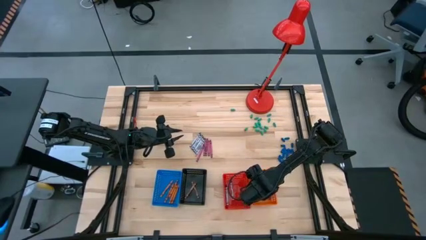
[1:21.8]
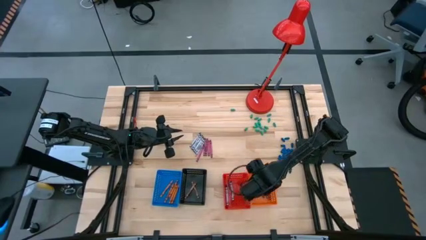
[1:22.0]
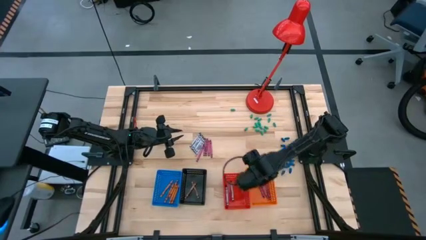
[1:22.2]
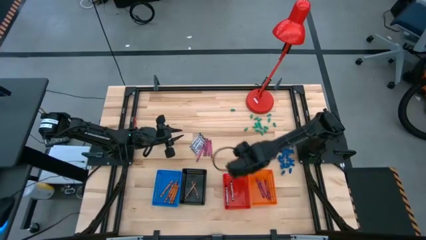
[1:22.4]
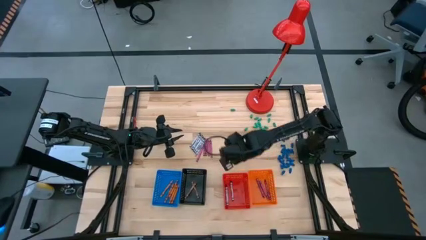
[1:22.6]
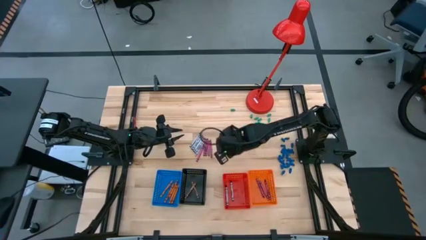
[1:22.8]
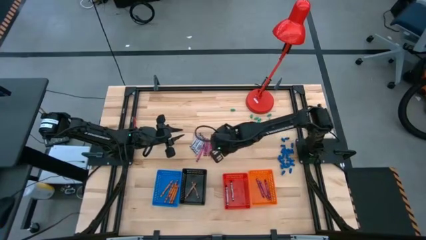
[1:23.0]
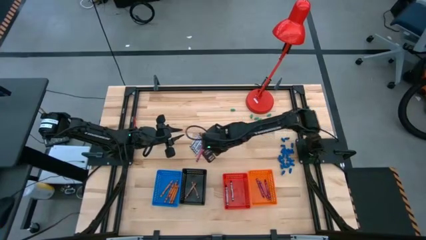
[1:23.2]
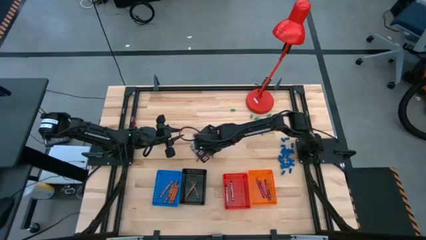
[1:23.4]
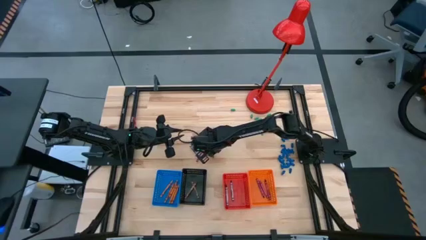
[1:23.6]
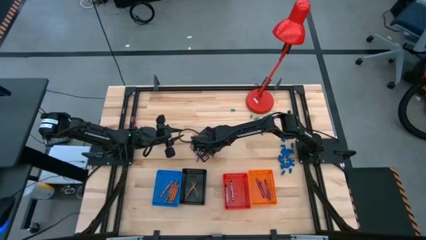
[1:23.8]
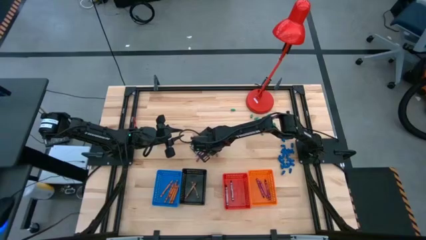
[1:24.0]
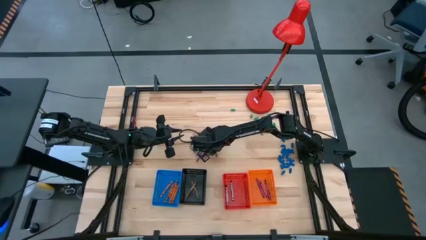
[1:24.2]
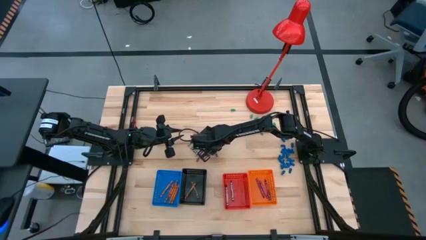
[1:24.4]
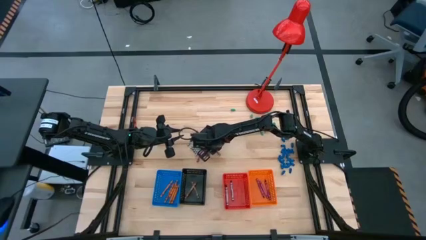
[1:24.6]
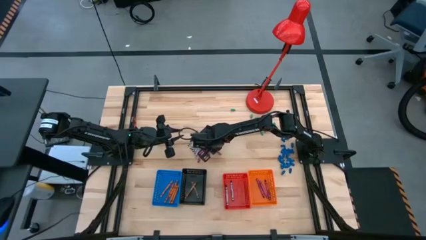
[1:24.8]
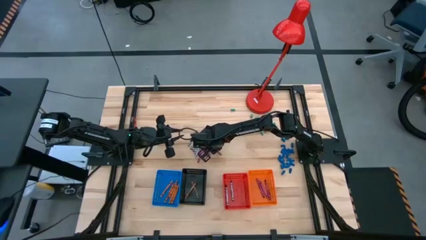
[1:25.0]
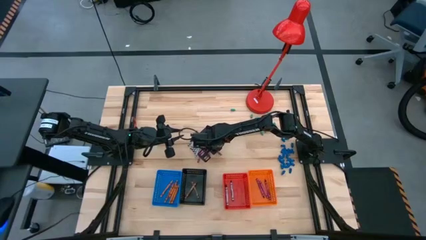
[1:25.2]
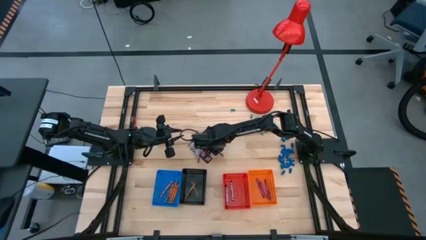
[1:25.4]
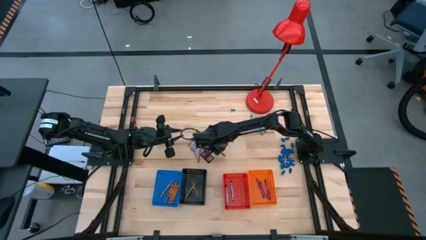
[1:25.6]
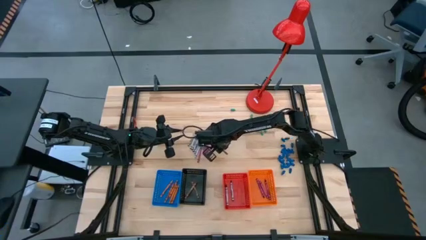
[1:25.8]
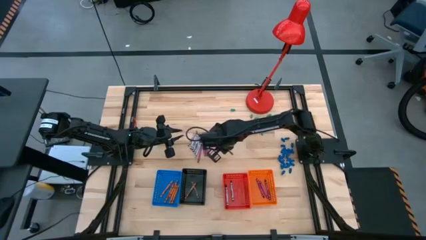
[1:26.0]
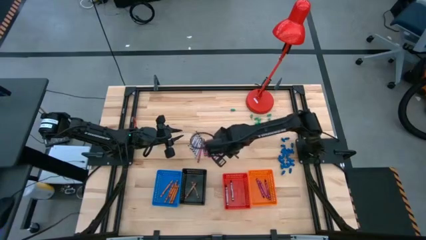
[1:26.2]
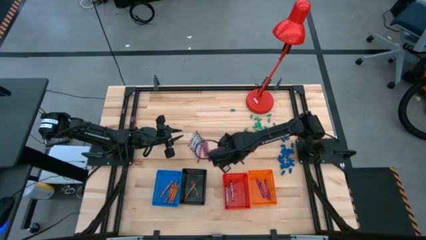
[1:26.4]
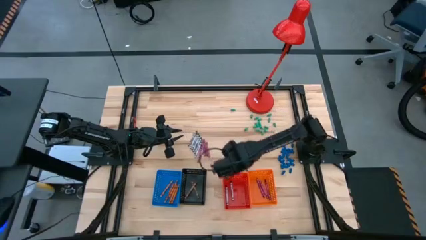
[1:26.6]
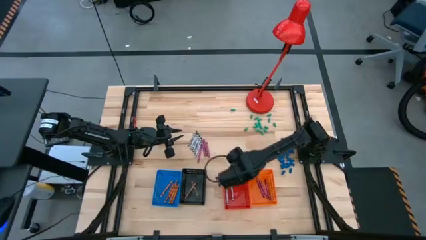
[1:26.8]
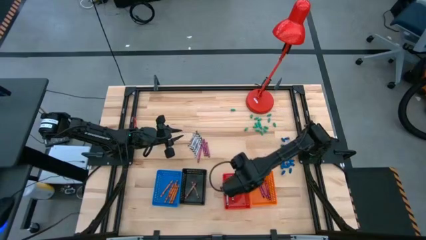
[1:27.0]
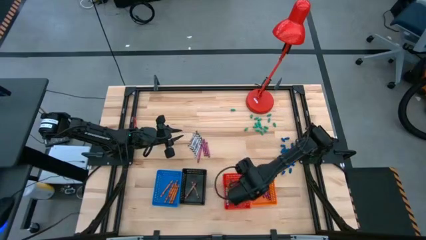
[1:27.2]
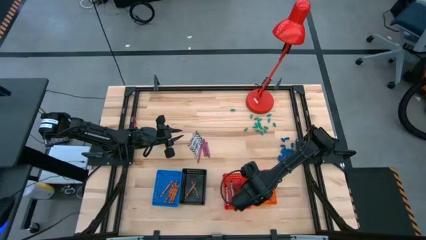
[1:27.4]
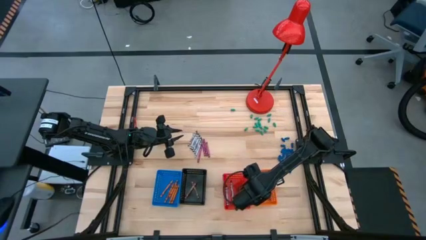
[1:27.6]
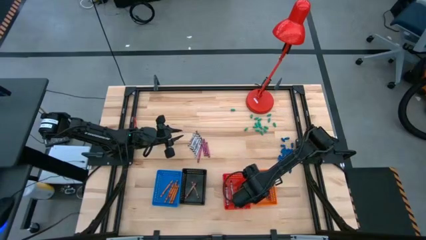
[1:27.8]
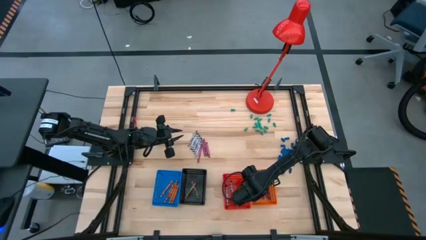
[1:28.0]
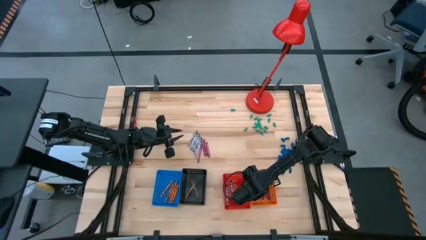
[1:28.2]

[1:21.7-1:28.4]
Task: Sort crayons
Put the violet crayon into the orange basket

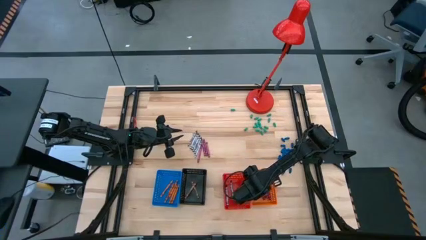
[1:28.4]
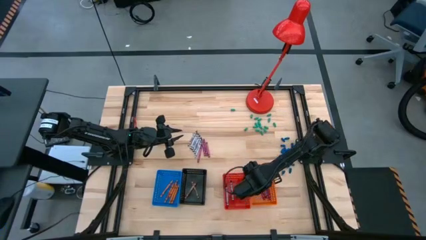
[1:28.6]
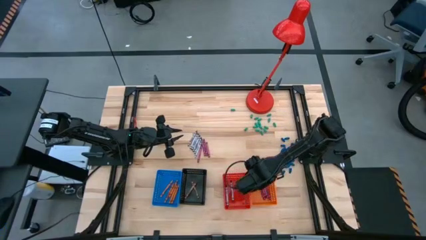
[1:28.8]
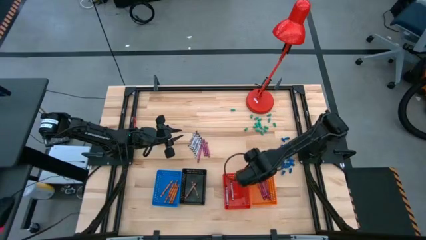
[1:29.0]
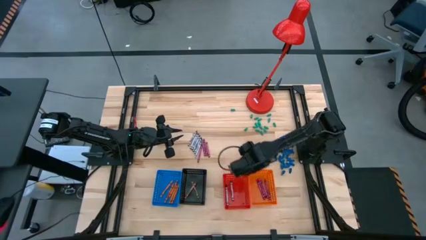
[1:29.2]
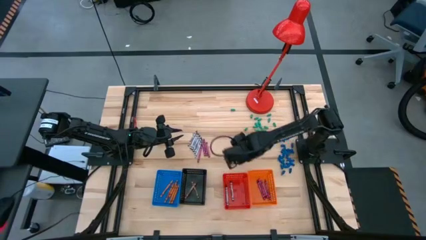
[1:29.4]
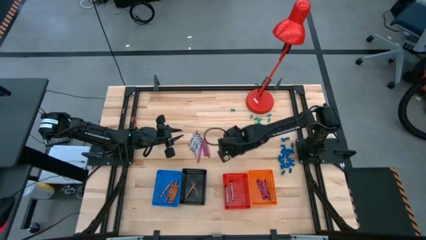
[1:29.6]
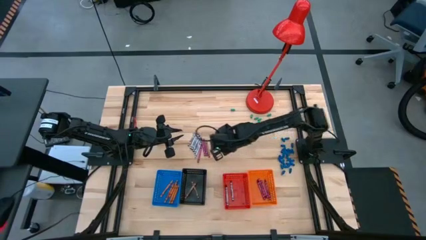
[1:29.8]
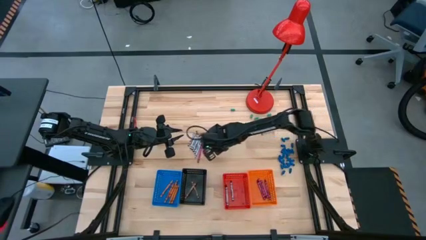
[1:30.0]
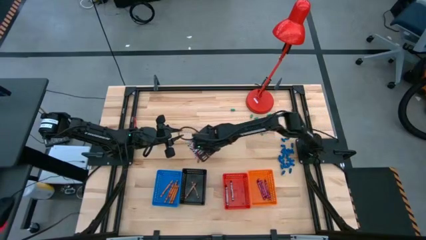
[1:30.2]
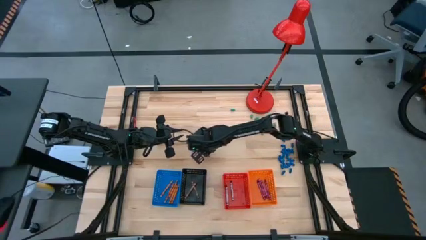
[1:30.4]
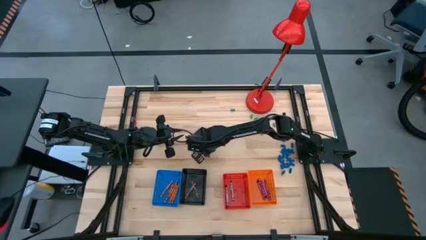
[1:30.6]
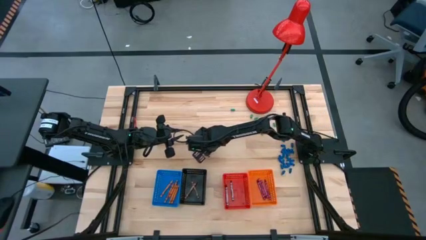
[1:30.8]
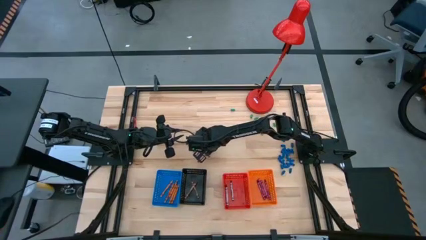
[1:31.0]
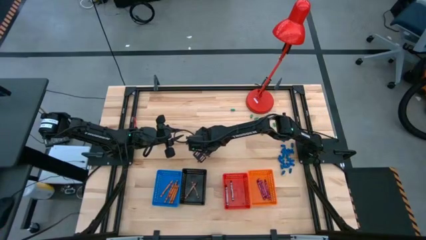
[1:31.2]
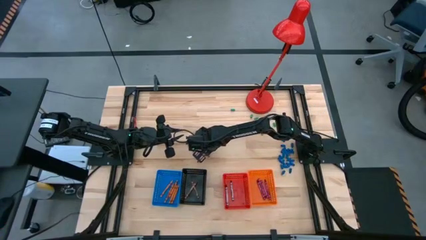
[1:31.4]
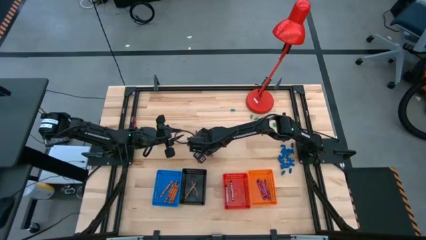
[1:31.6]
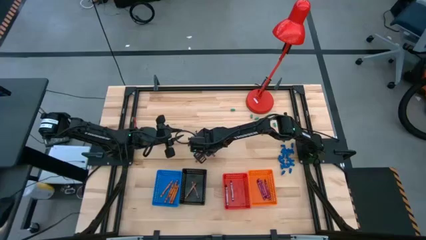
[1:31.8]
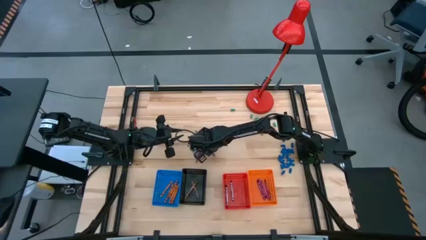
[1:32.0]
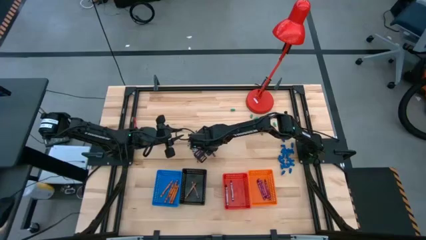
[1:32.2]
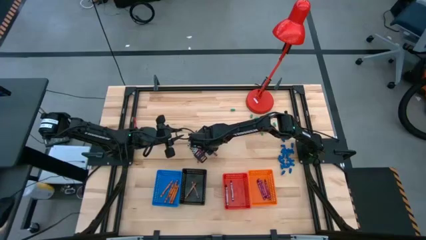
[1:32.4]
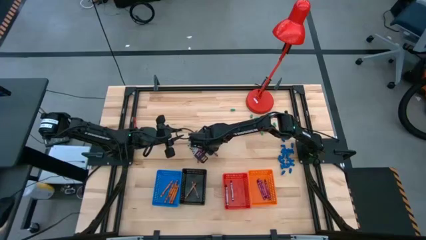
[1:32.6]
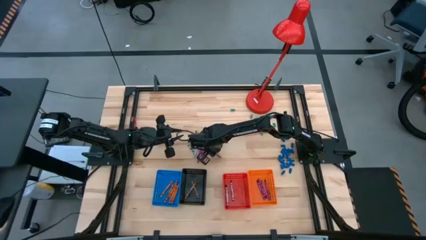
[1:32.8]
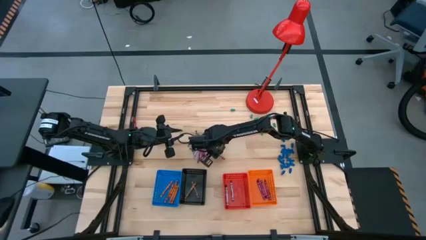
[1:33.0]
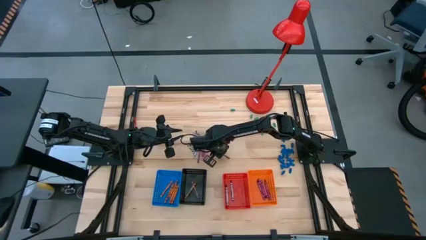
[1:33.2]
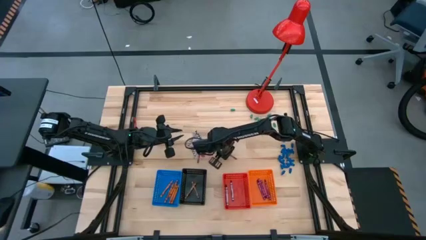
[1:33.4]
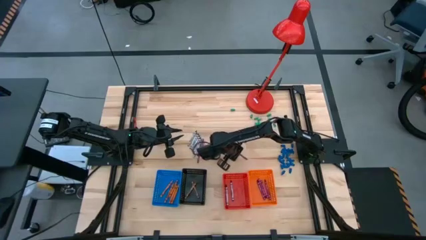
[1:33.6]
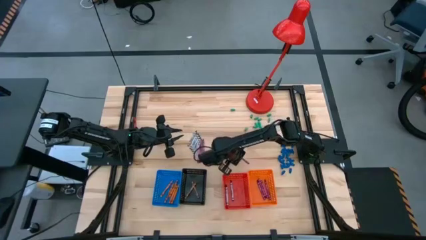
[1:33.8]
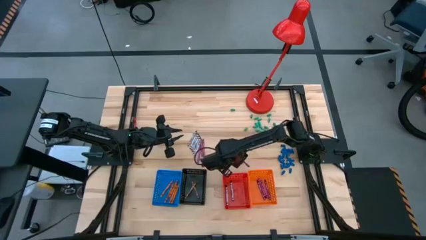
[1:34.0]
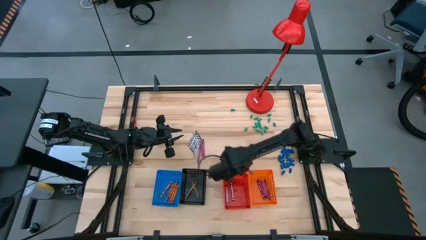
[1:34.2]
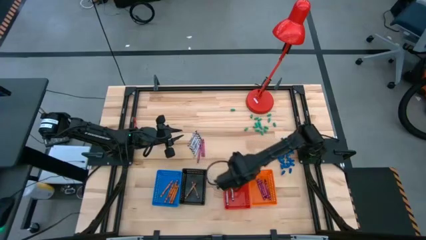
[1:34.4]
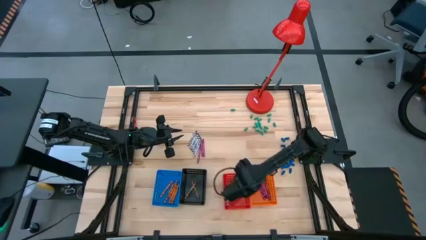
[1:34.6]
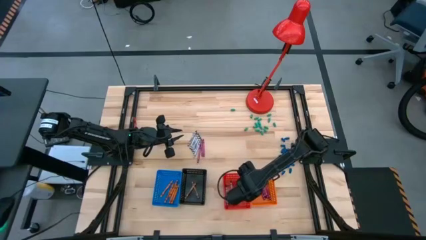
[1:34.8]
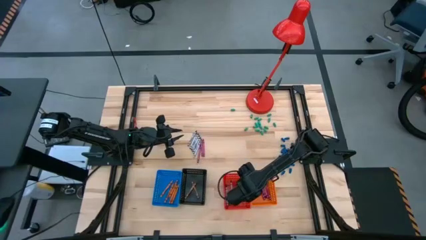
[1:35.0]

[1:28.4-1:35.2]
Put the violet crayon into the orange basket
